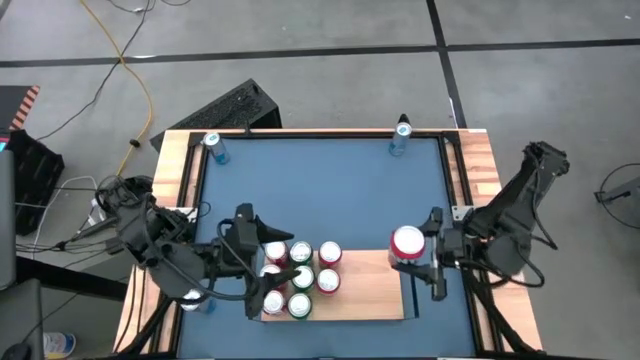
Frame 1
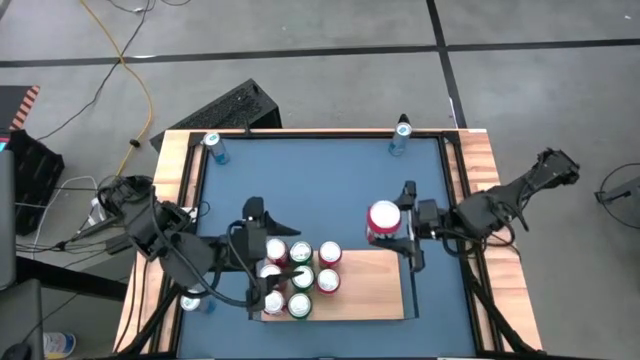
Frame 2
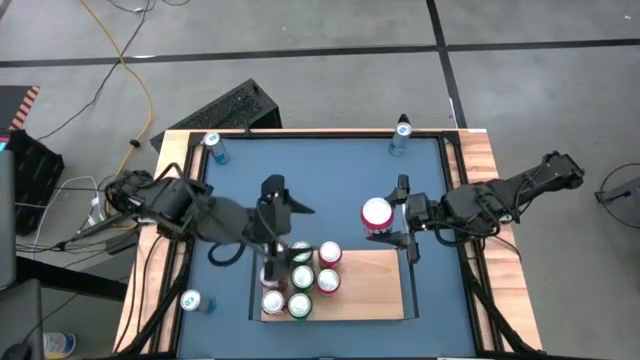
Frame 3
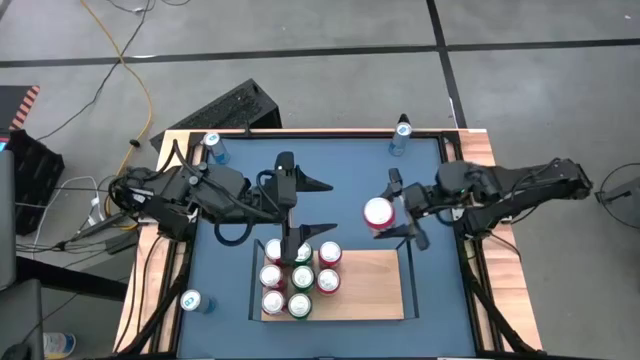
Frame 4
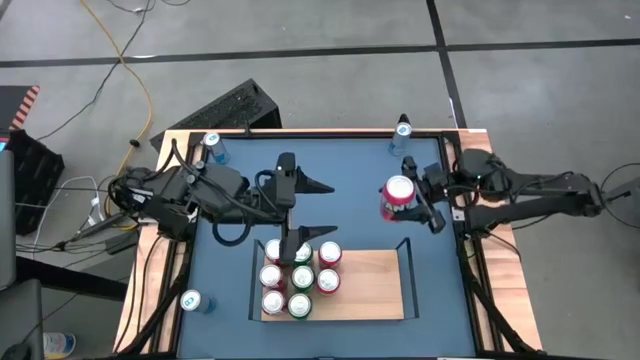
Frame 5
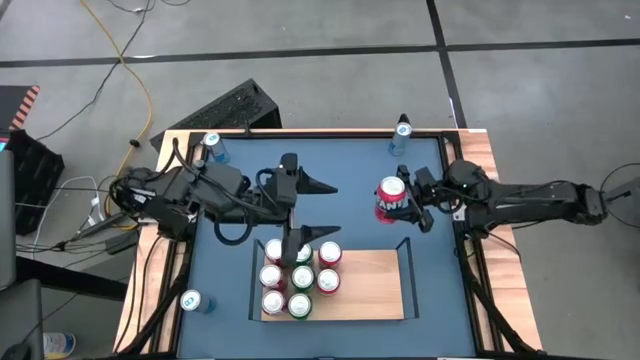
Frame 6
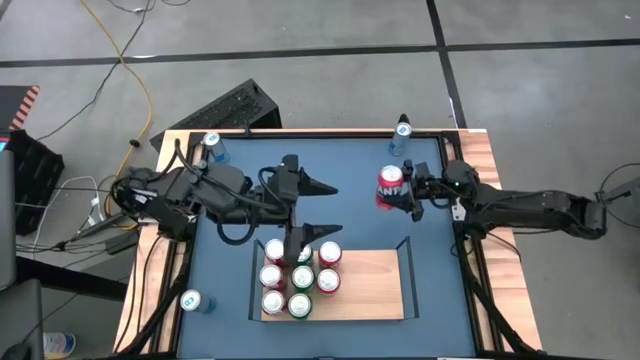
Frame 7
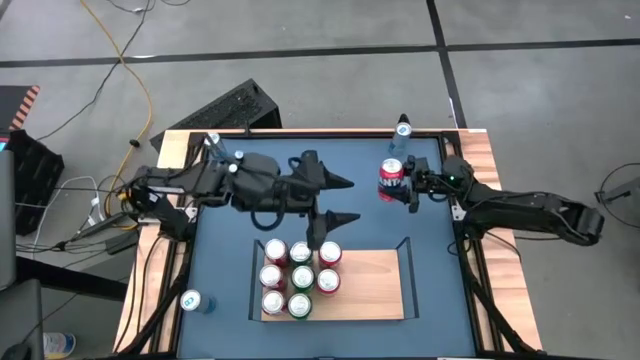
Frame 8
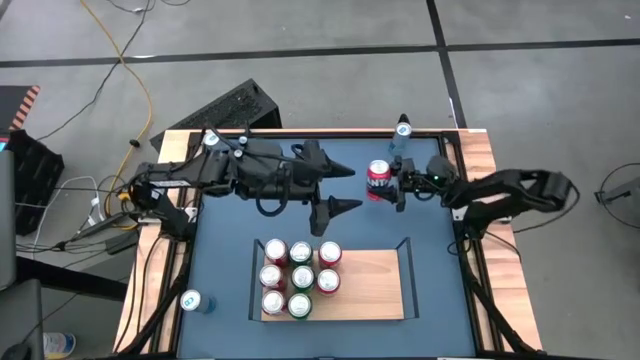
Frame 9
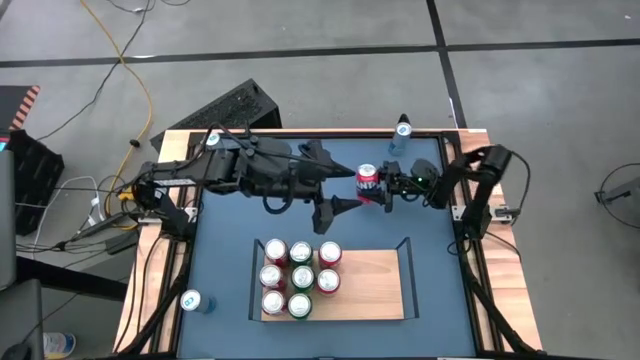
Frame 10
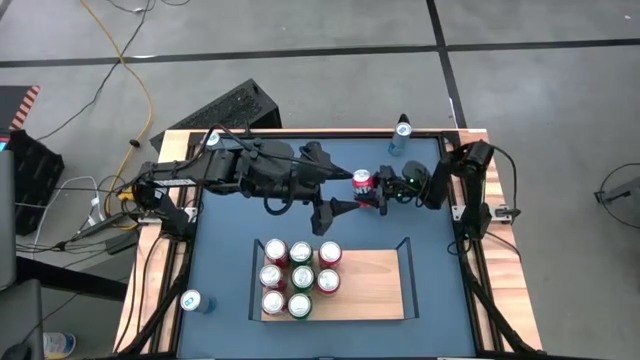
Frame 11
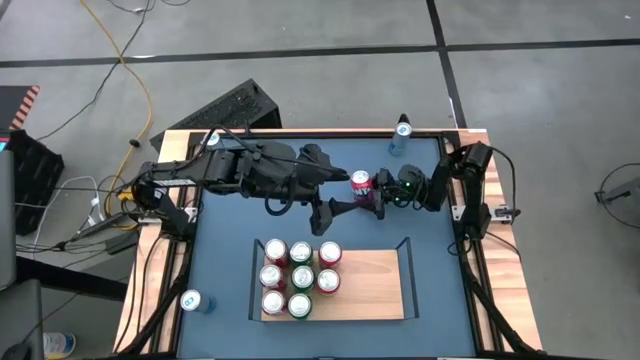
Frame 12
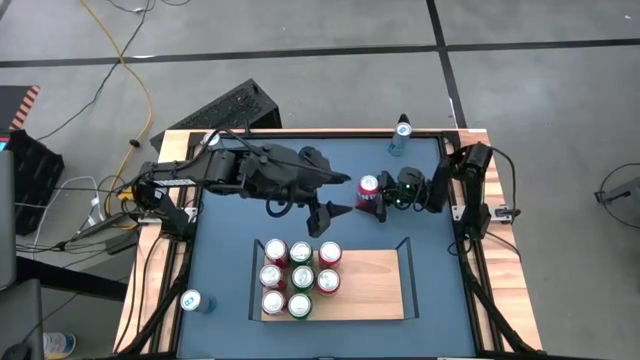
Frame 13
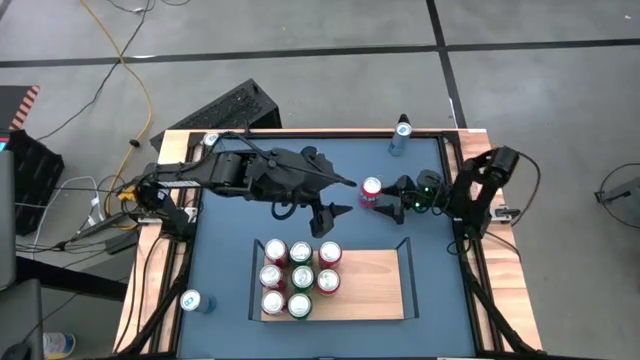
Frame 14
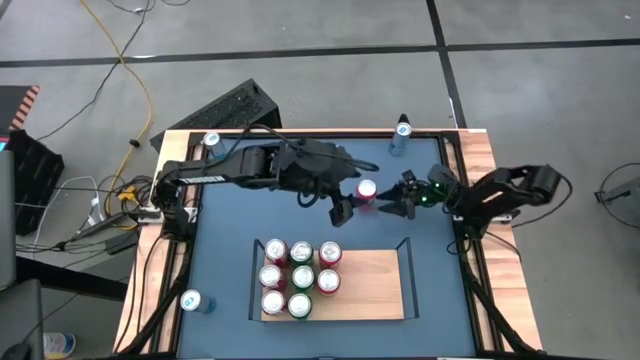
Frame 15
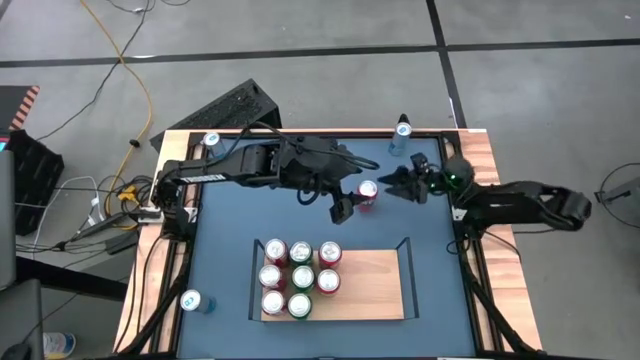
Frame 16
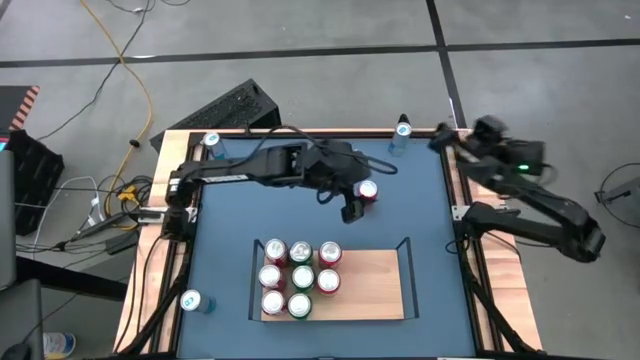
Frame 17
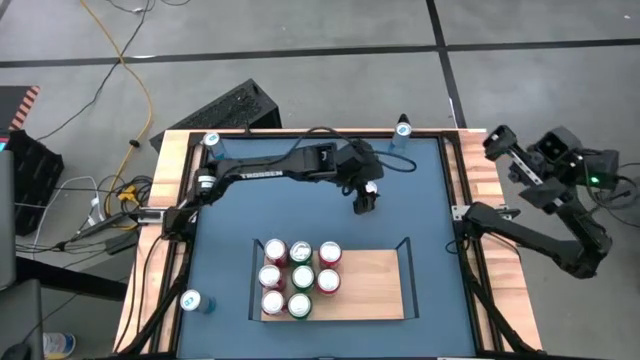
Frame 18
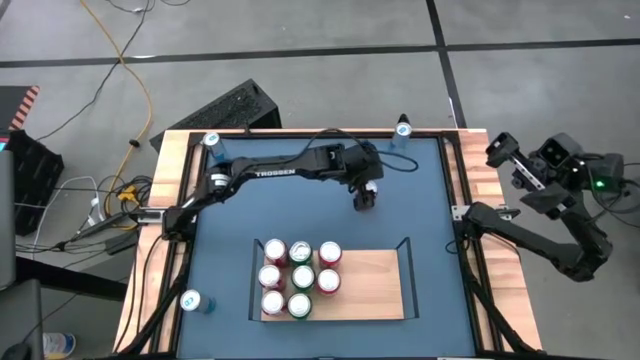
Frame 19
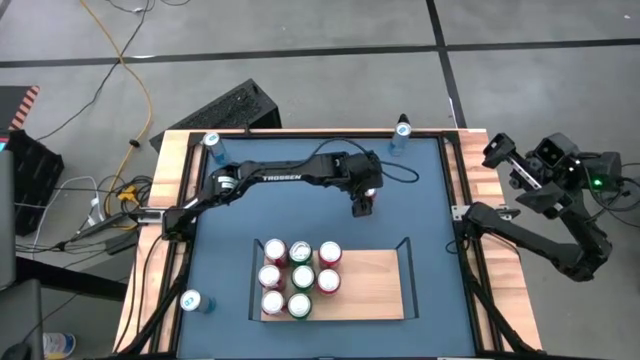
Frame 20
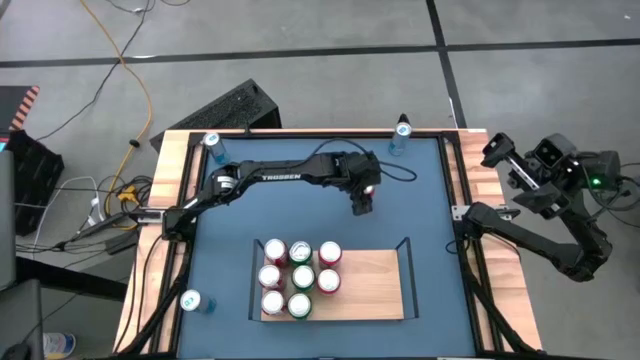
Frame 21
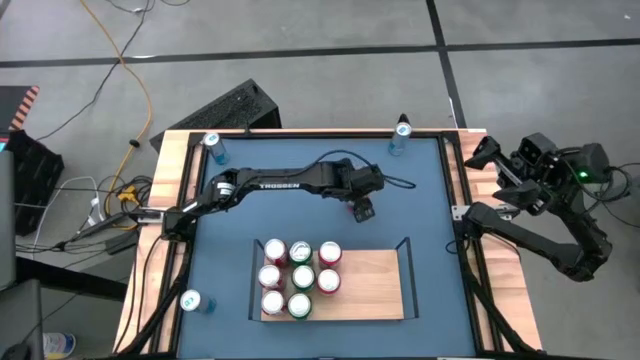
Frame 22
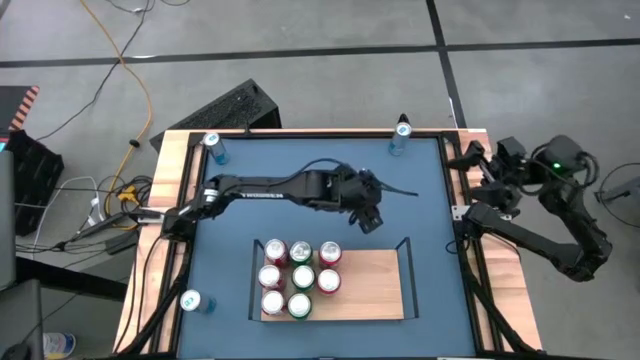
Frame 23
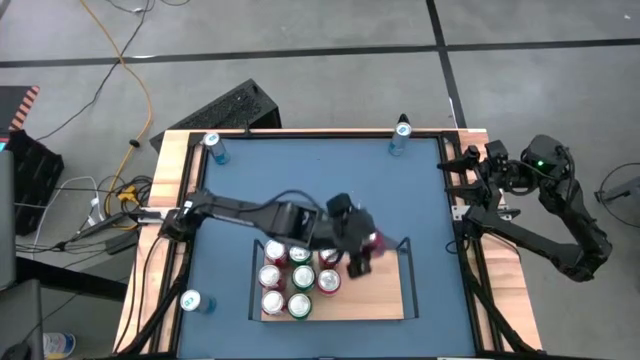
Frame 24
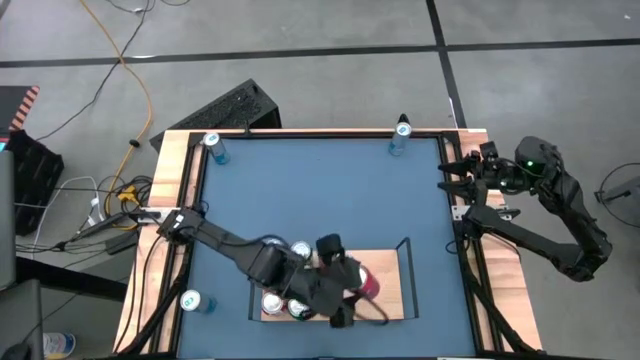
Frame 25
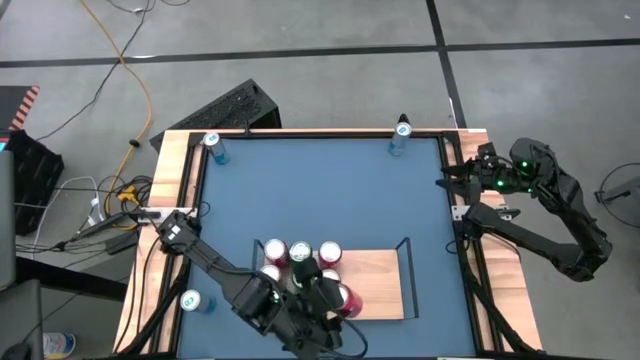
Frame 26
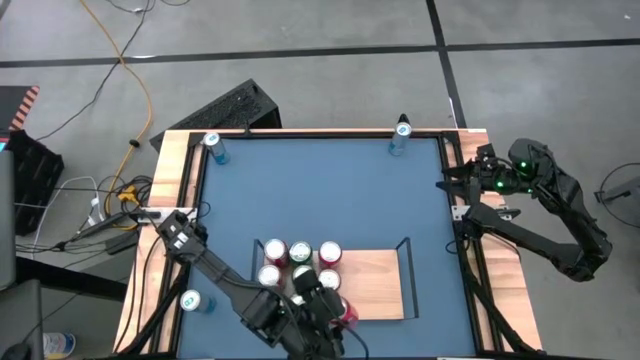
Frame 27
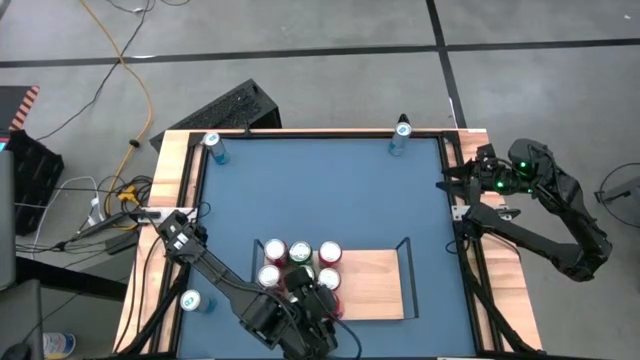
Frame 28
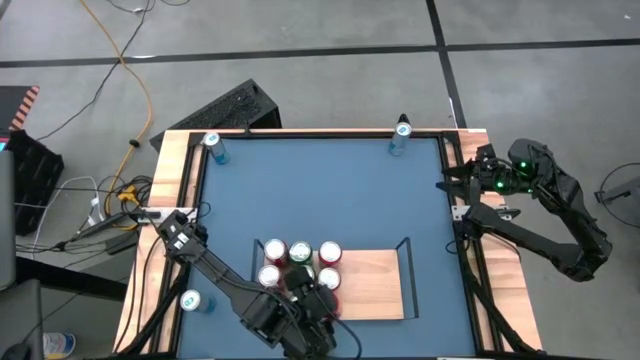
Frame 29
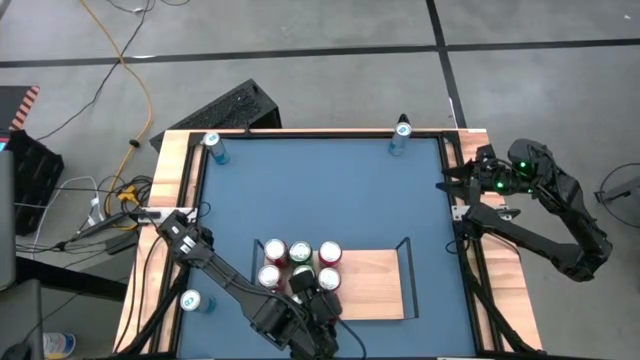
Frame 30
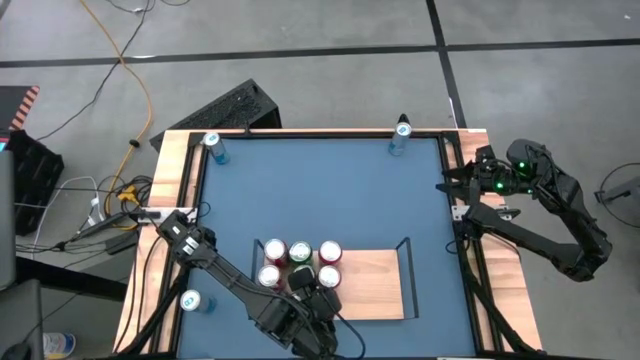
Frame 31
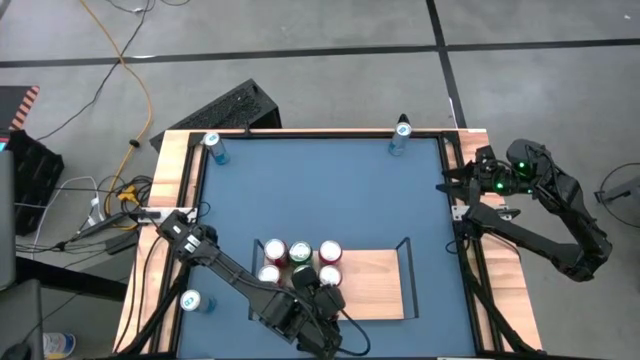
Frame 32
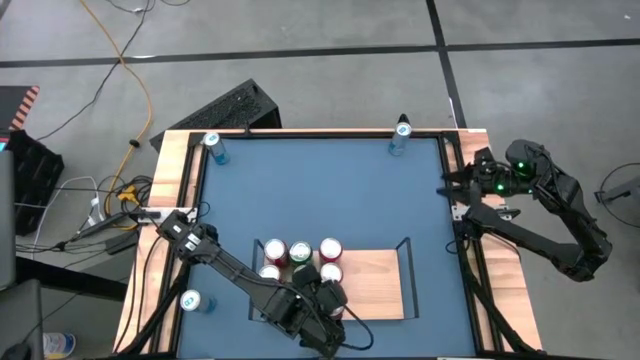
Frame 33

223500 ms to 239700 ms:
Task: Place canned beverage on shelf
Put the orange soda can on the shelf aligned with the other orange soda can

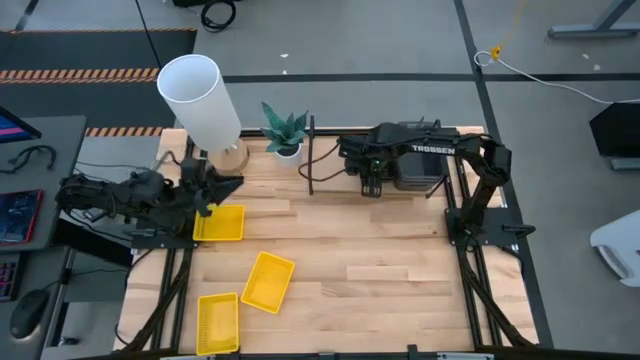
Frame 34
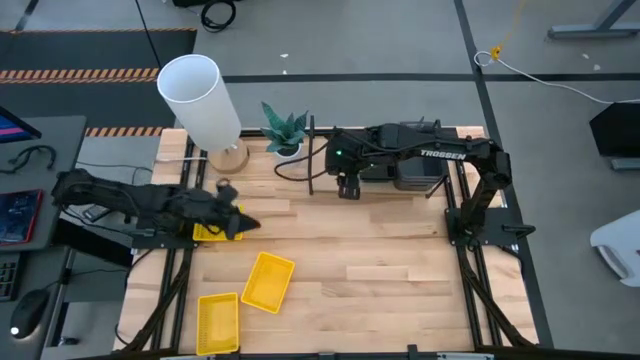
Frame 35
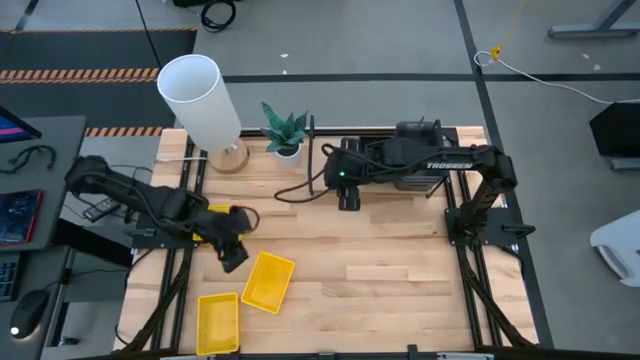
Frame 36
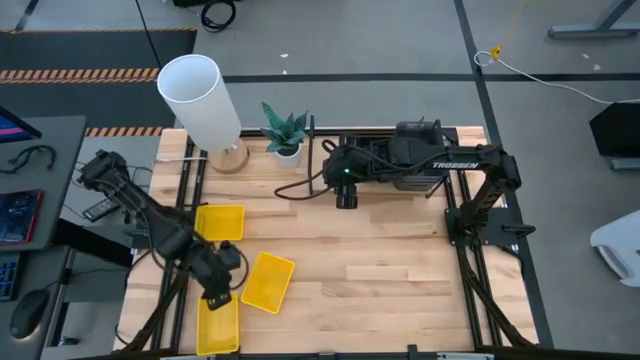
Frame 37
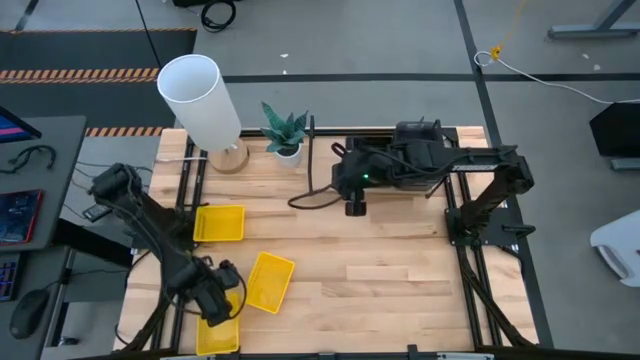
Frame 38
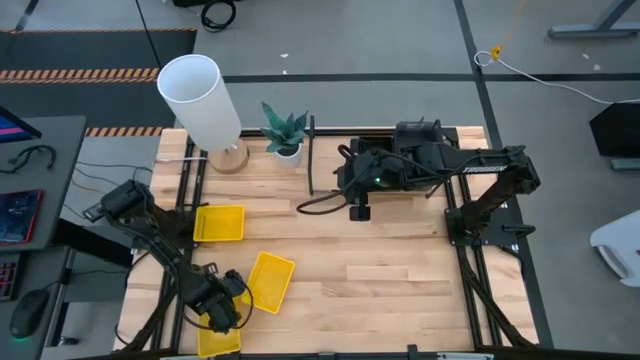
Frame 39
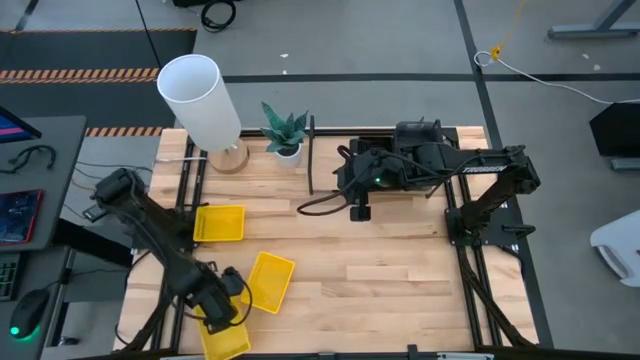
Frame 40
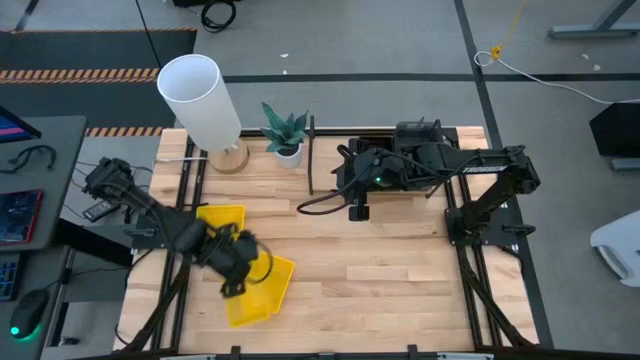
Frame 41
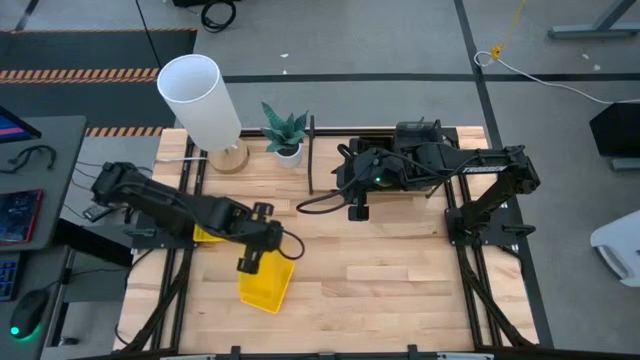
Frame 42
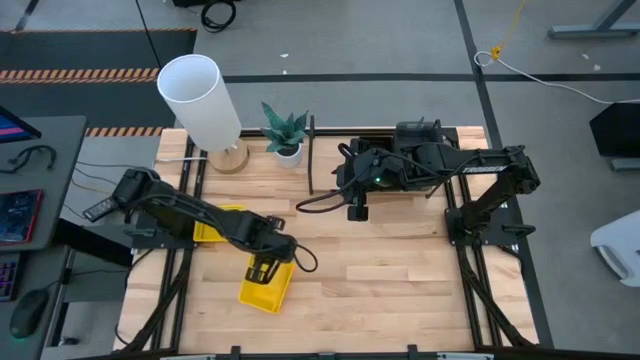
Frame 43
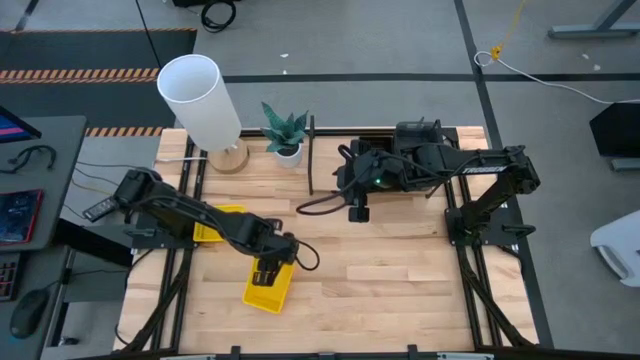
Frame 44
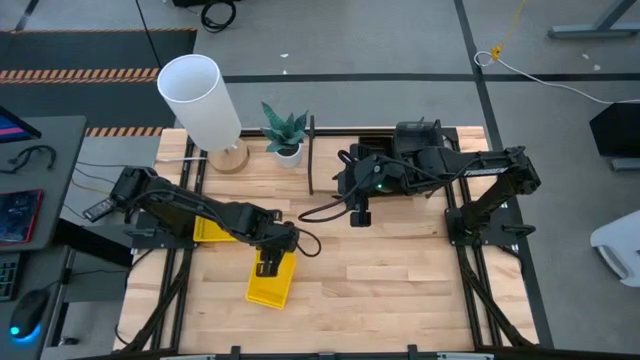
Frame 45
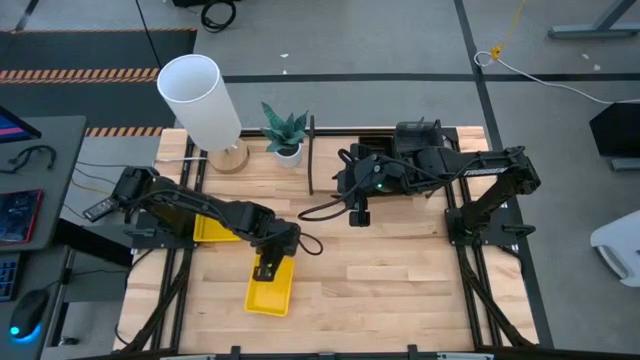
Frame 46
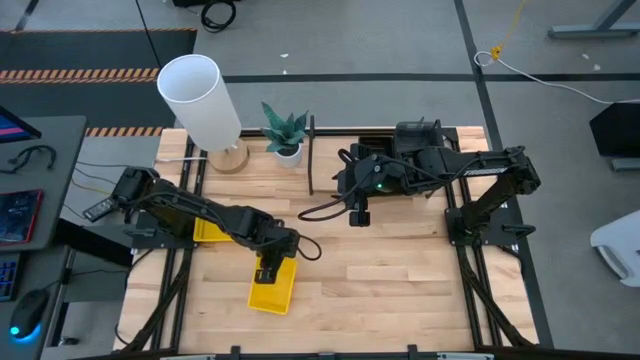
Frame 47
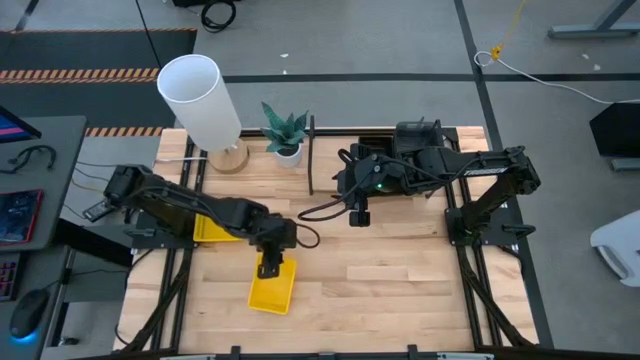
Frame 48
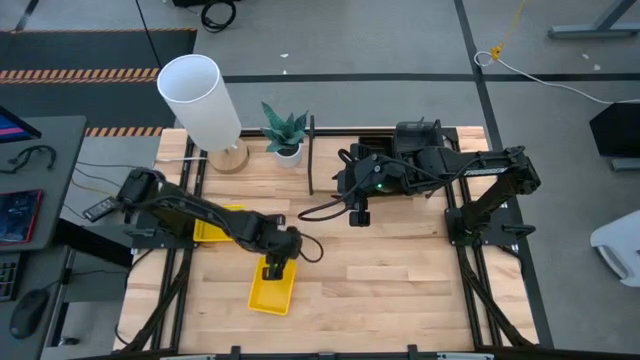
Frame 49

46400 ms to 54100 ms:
Task: Stack baskets on shelf by color
Stack the bottom yellow bin on the middle yellow bin
